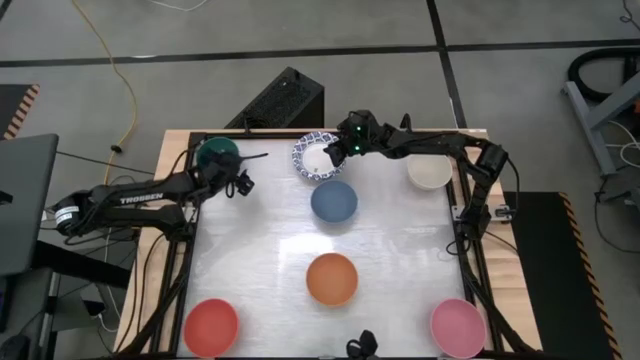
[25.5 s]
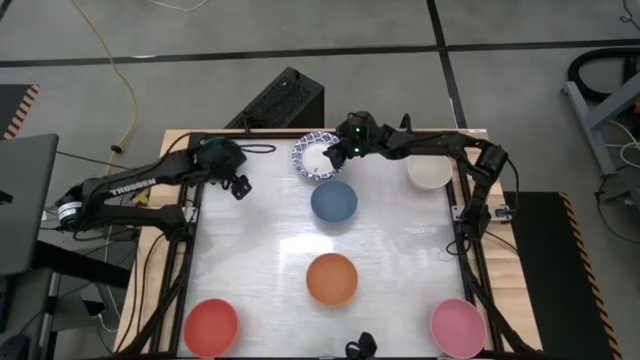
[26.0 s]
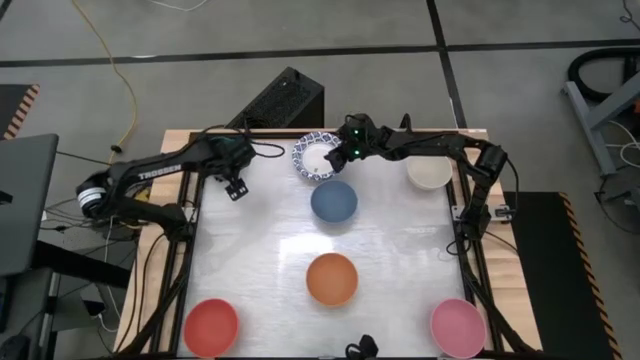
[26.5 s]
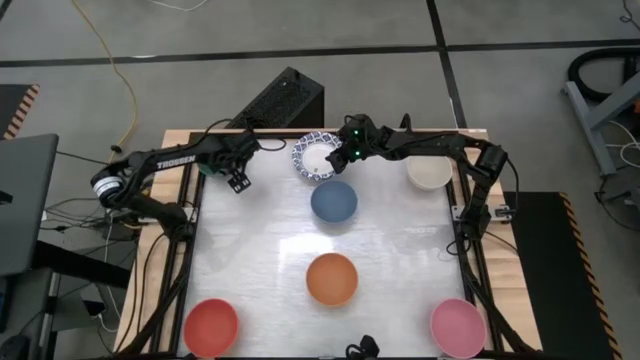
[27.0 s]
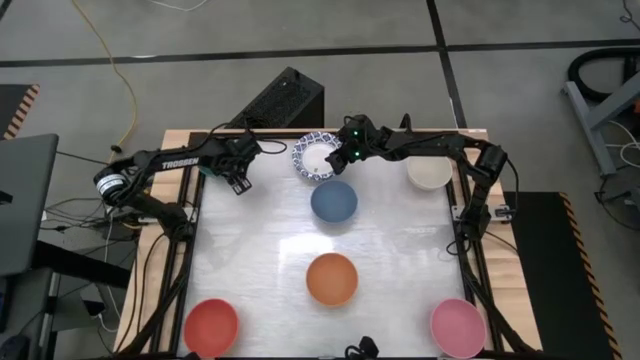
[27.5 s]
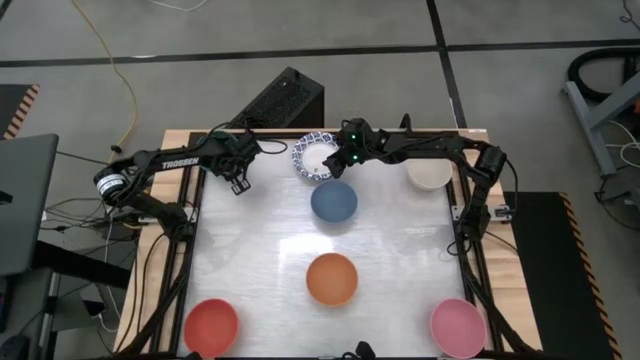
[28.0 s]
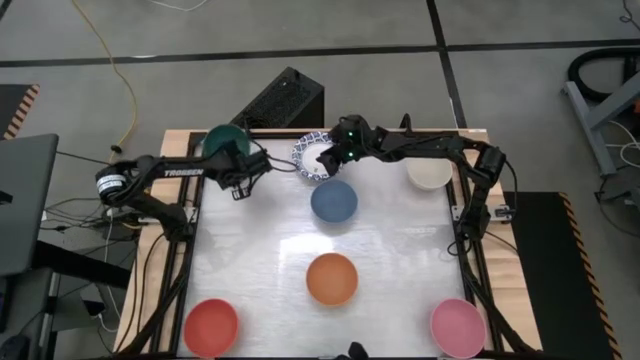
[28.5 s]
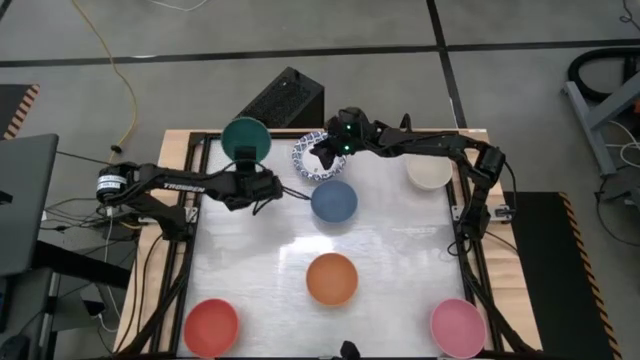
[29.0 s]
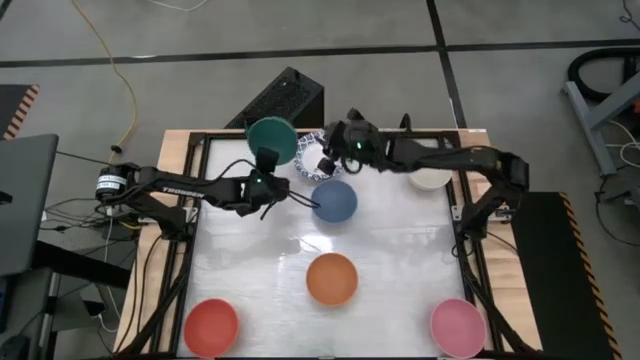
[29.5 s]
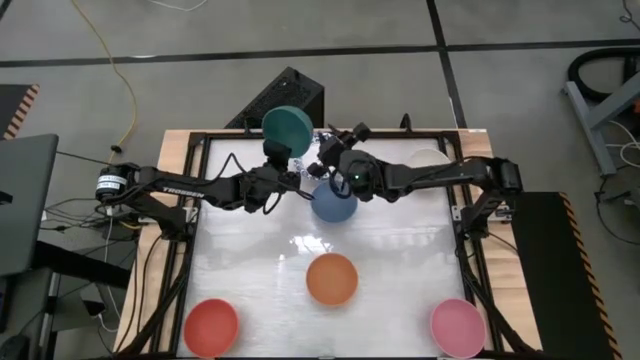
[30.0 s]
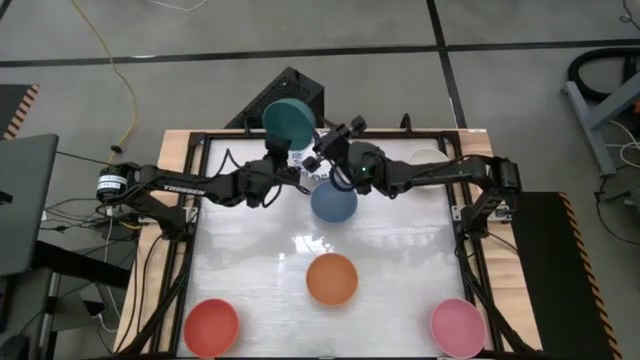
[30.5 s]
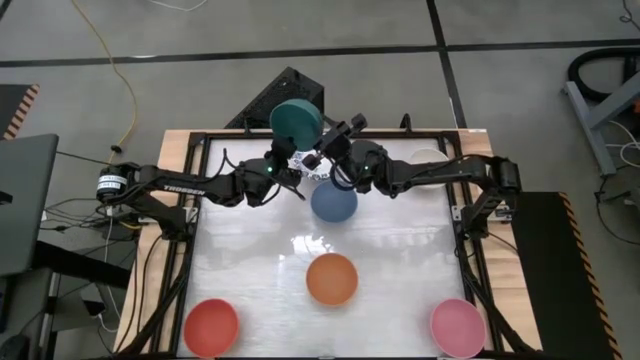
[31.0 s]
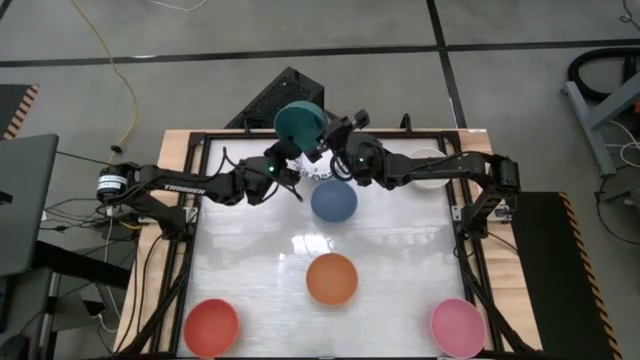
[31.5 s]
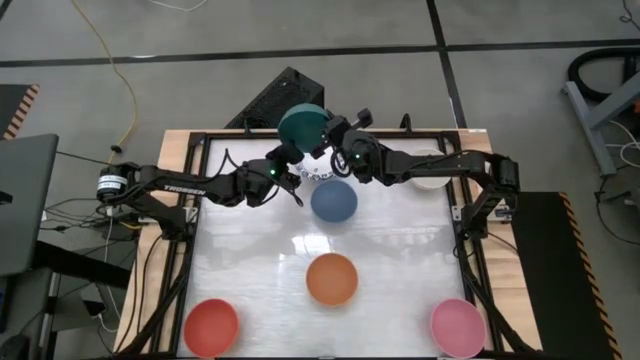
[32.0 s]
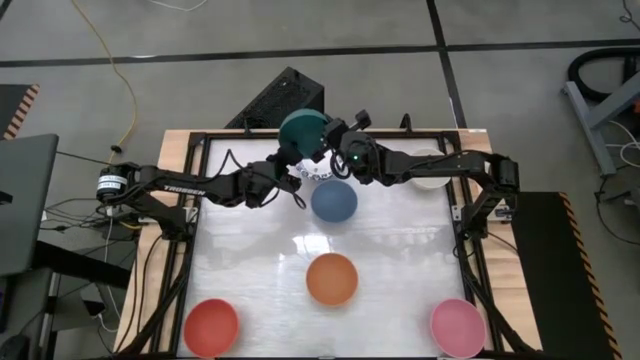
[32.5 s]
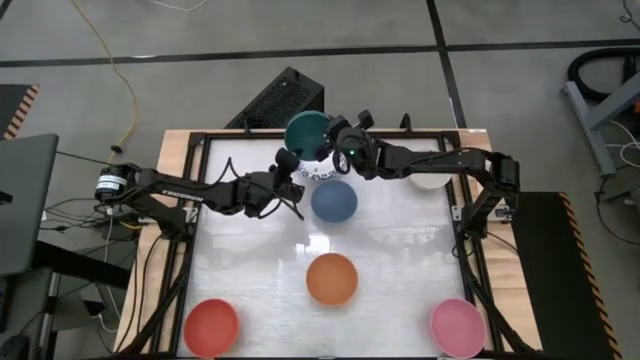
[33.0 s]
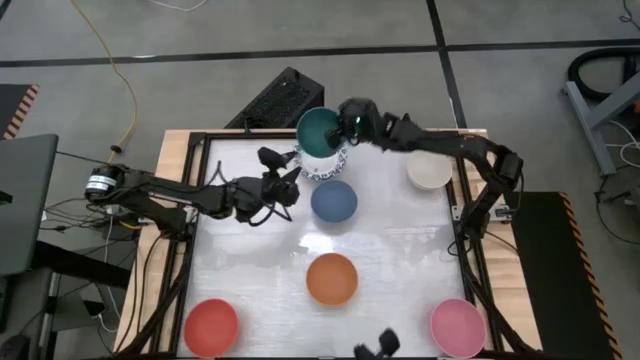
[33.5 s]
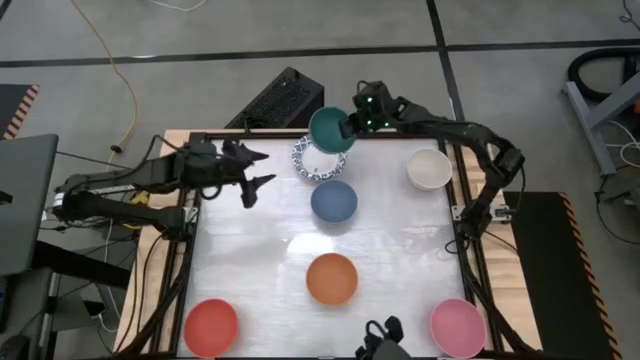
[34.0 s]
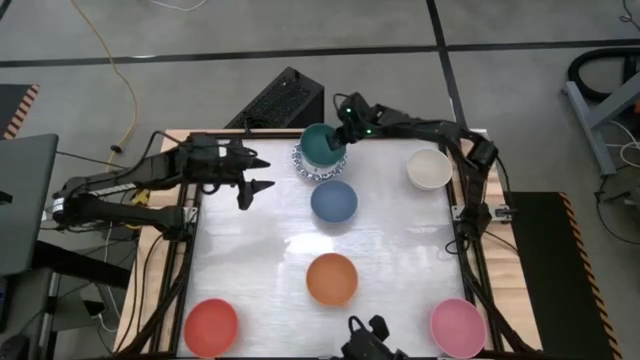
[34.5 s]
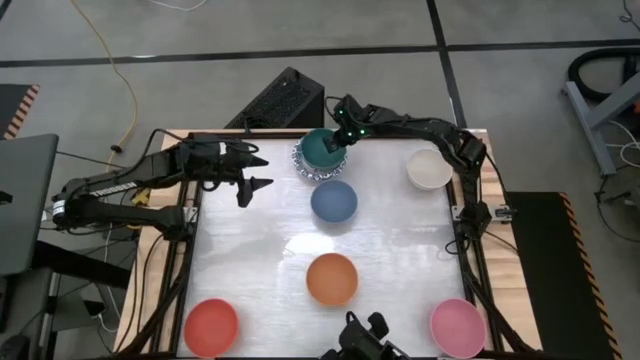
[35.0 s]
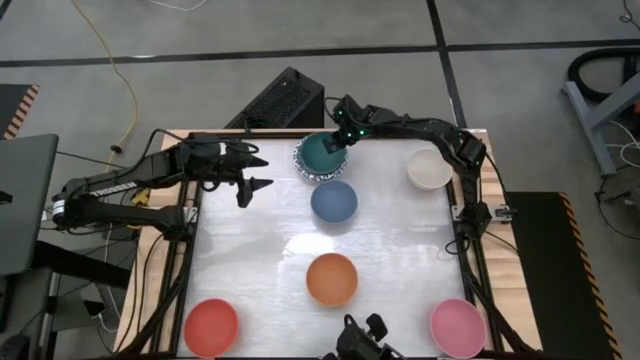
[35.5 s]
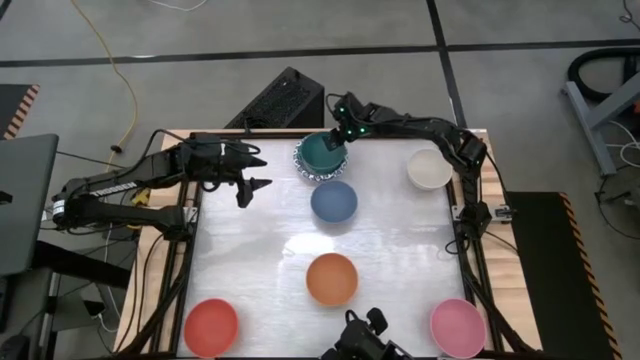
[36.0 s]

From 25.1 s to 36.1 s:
Stack the green bowl on top of the white patterned bowl

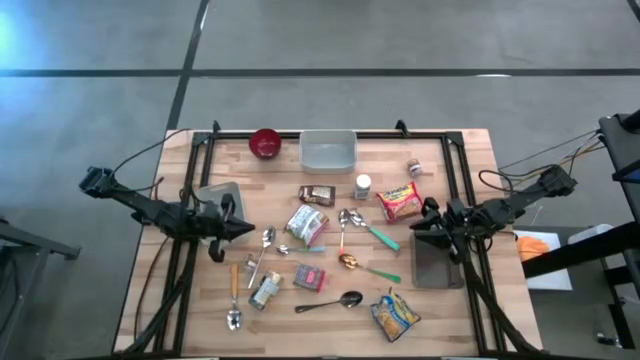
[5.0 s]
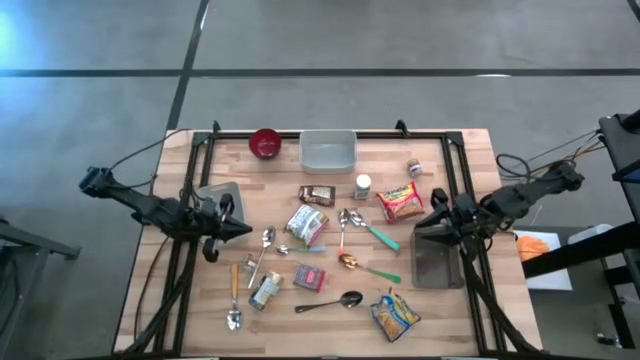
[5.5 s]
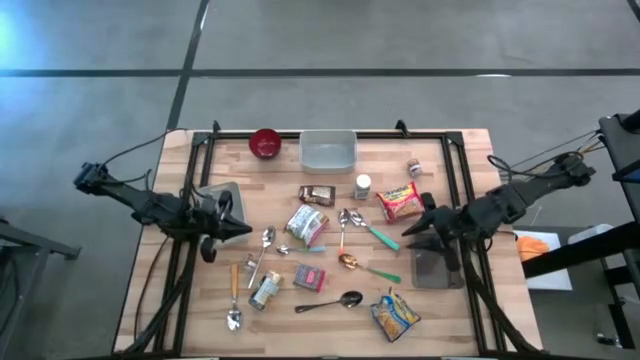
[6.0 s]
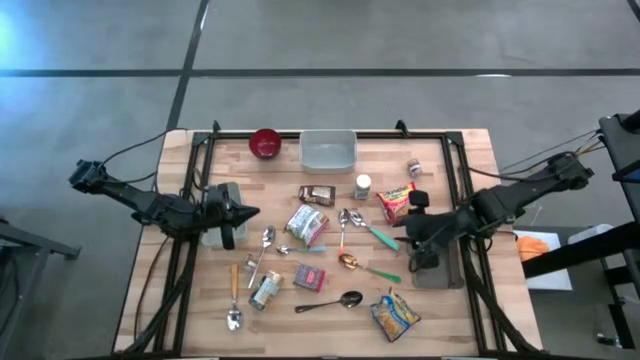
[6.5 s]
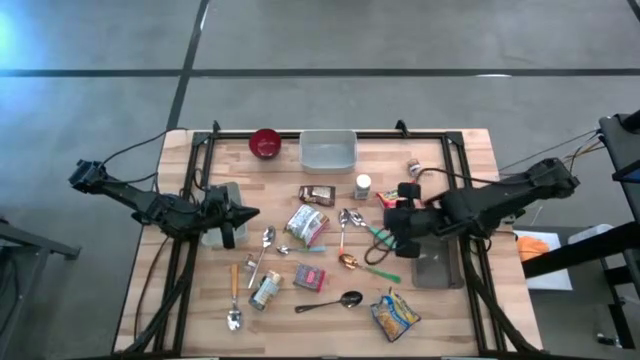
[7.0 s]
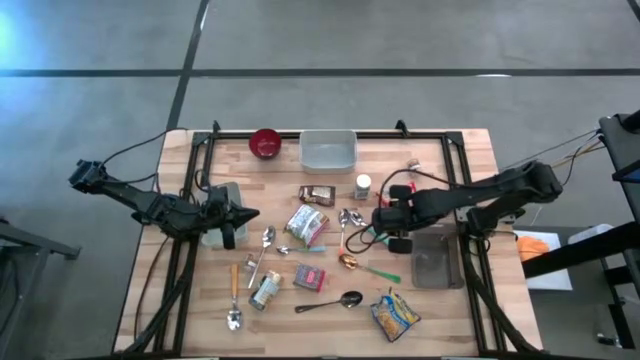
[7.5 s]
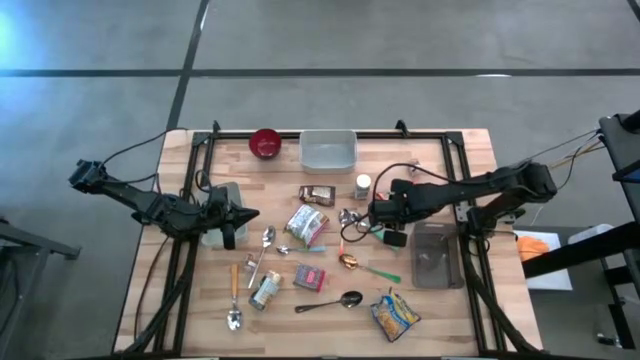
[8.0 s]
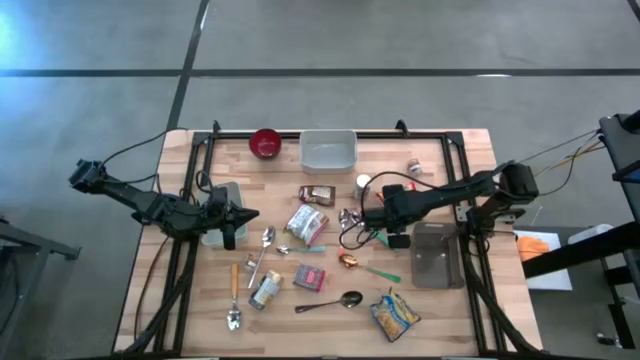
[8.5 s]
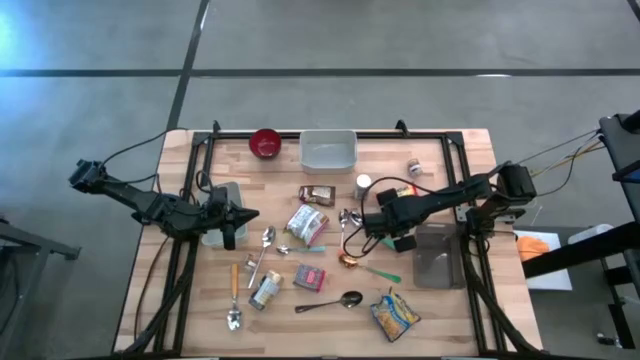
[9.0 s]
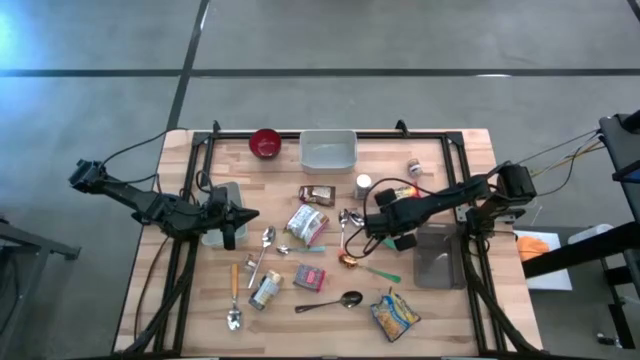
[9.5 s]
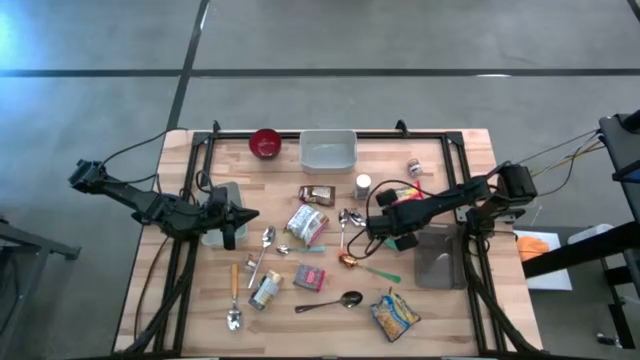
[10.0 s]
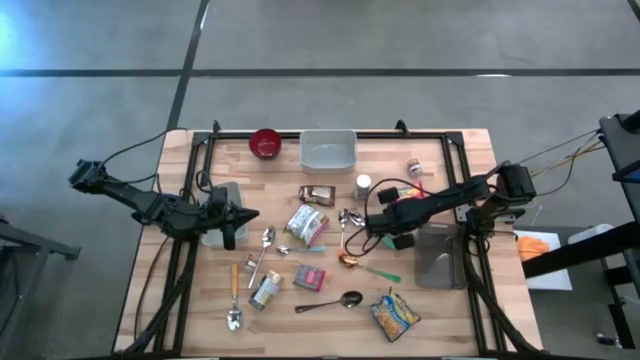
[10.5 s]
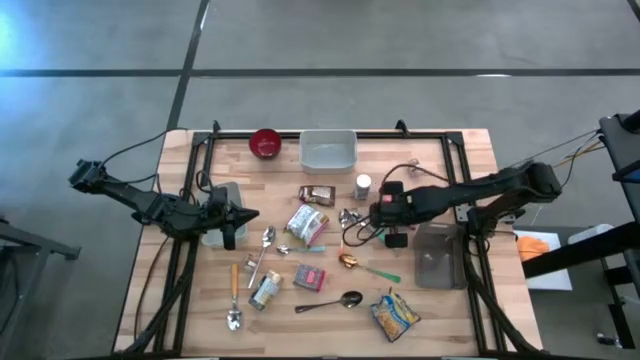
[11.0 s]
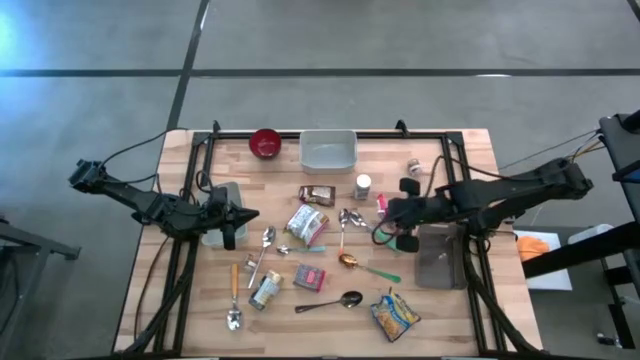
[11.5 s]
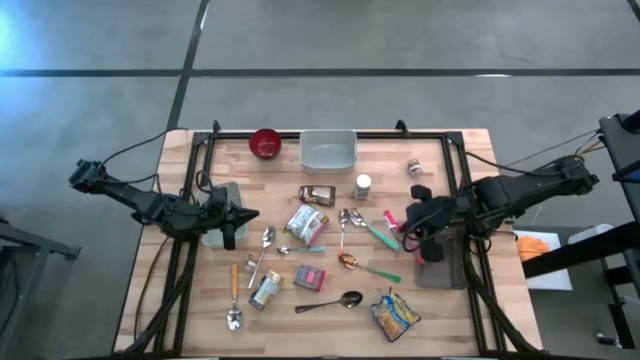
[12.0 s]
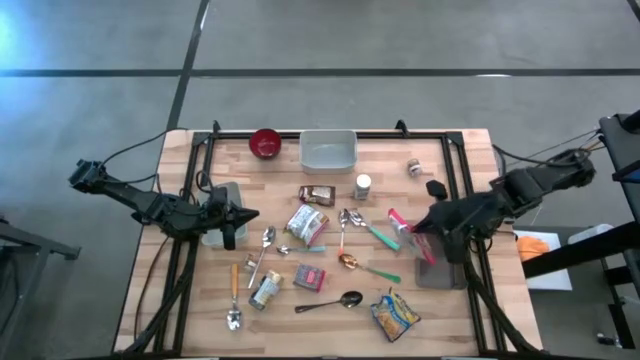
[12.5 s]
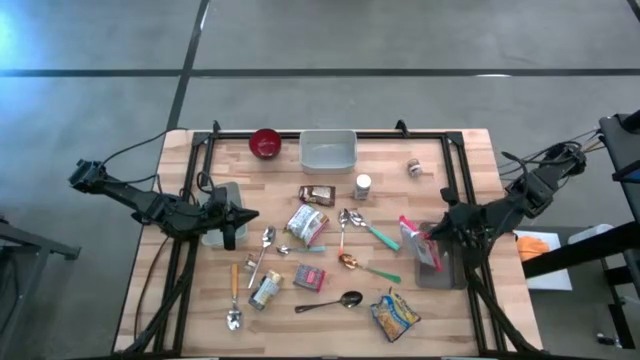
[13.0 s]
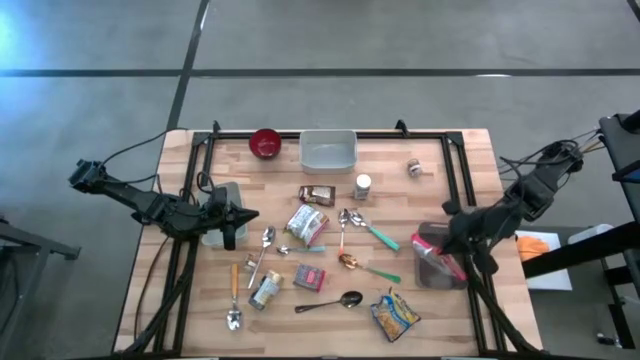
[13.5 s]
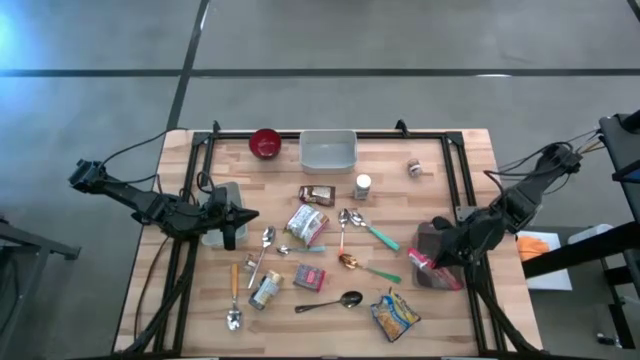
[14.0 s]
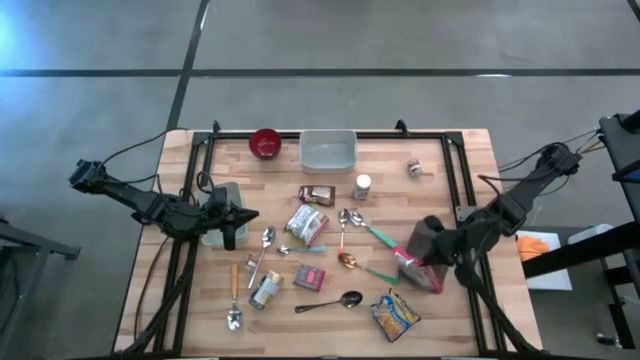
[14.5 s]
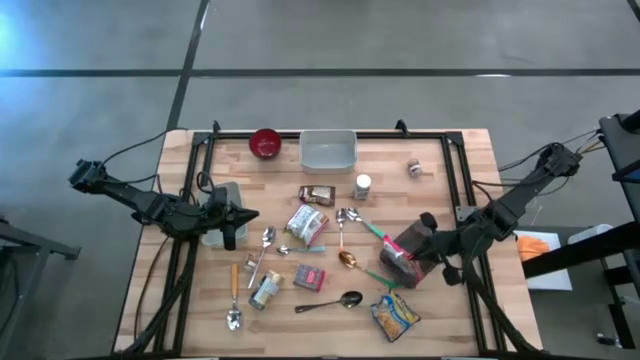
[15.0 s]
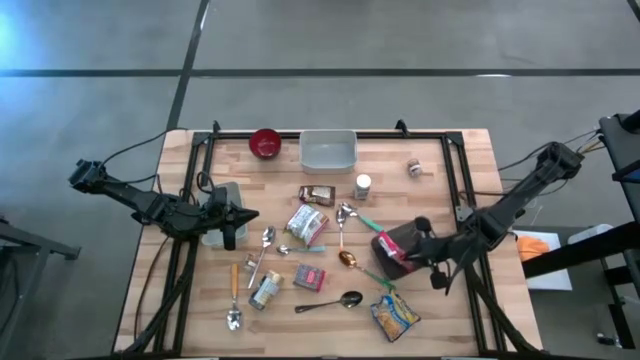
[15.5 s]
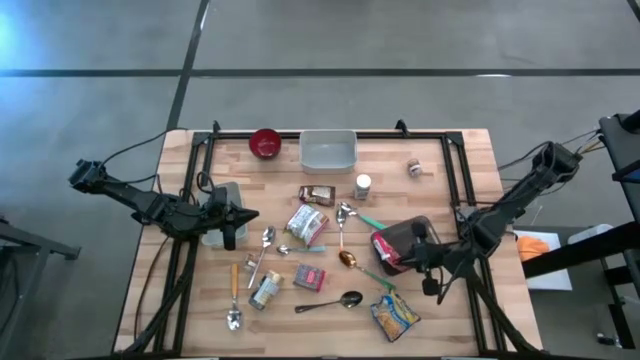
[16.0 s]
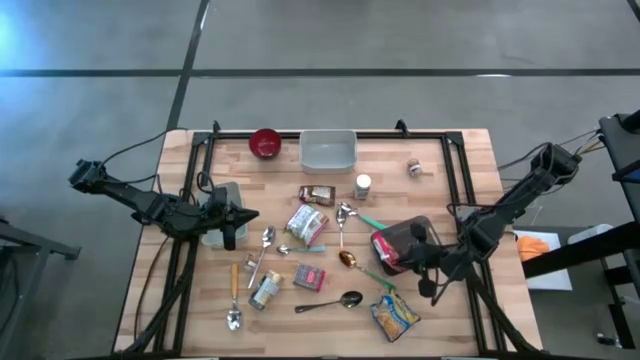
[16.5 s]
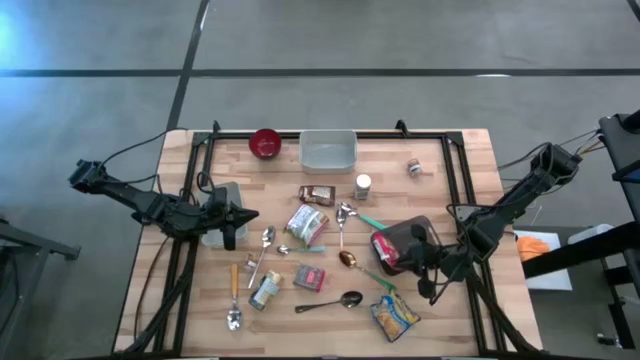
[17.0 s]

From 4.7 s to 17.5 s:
Put the red noodle pack into the black bin
